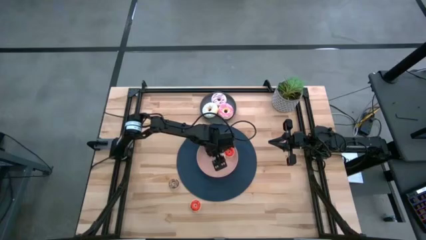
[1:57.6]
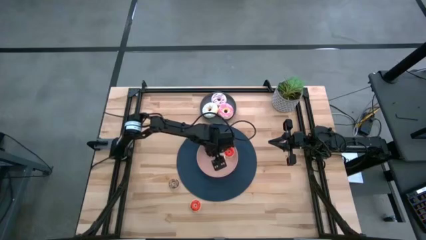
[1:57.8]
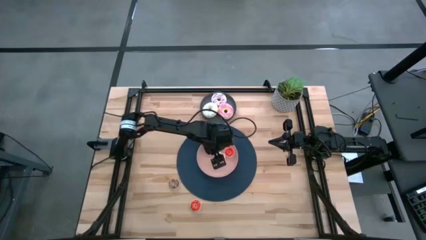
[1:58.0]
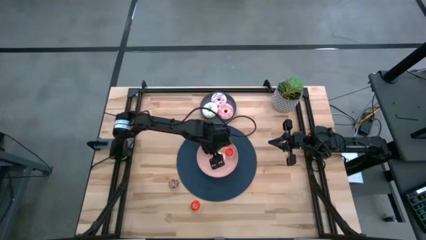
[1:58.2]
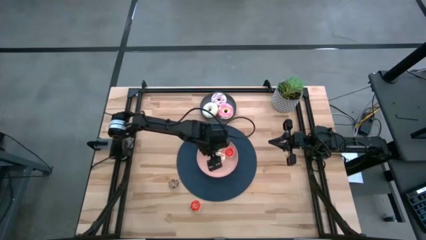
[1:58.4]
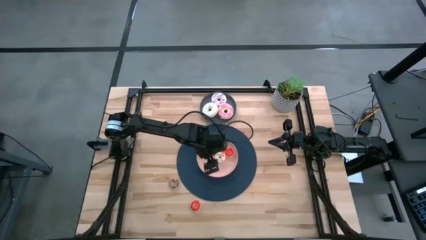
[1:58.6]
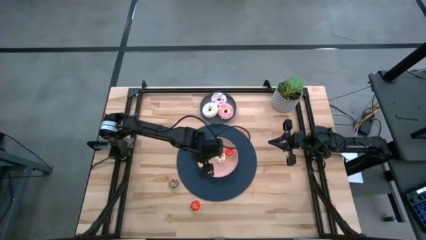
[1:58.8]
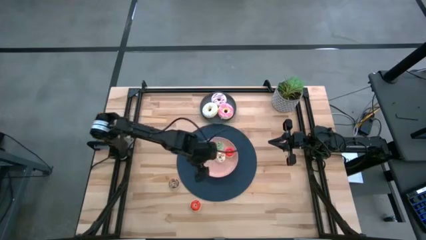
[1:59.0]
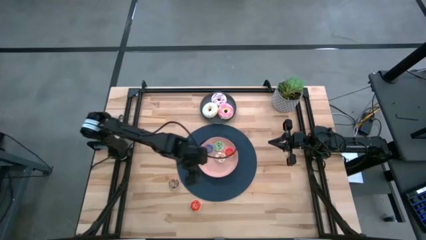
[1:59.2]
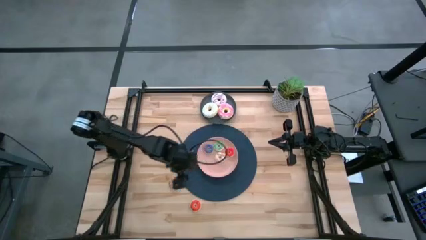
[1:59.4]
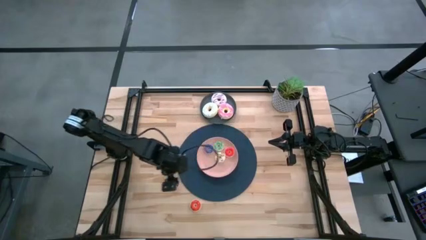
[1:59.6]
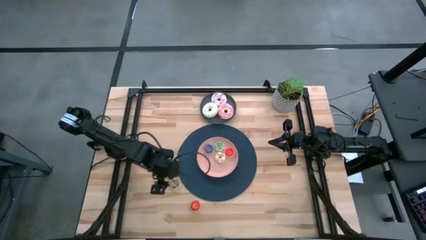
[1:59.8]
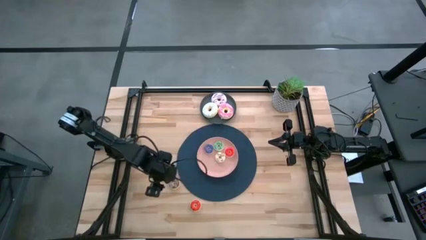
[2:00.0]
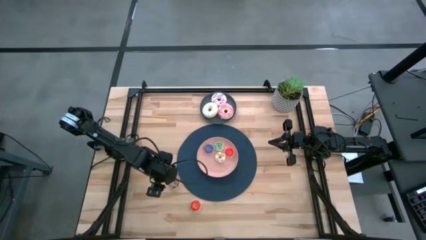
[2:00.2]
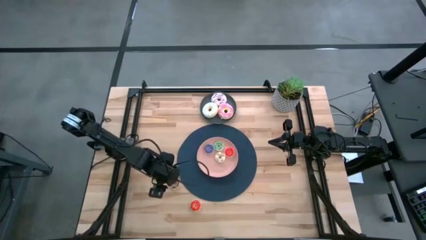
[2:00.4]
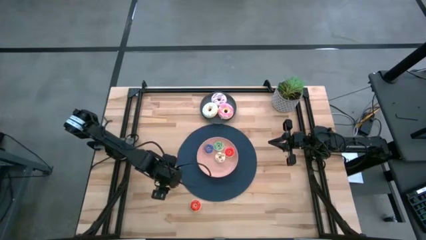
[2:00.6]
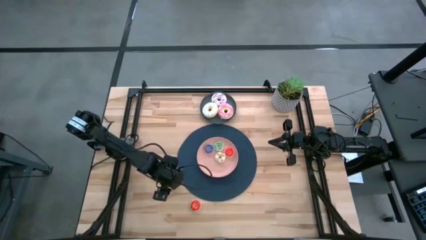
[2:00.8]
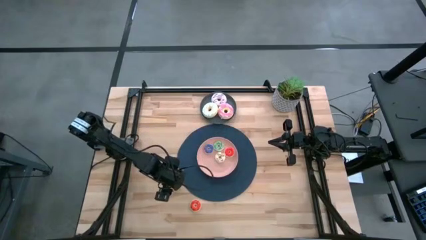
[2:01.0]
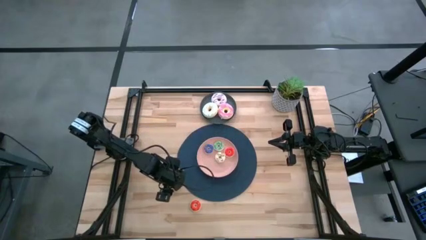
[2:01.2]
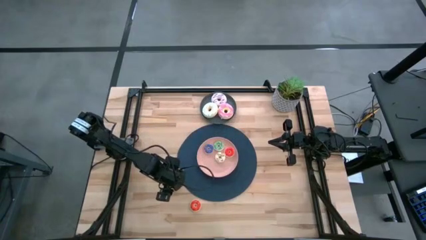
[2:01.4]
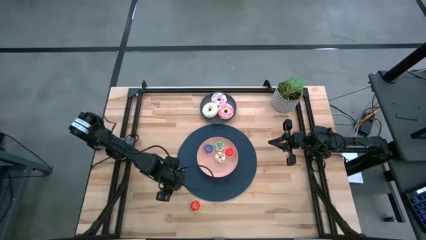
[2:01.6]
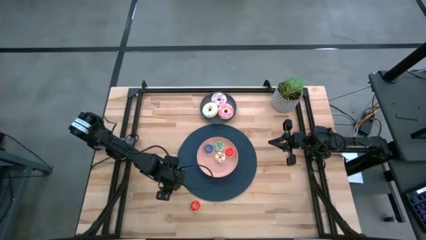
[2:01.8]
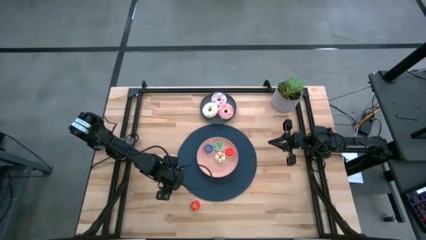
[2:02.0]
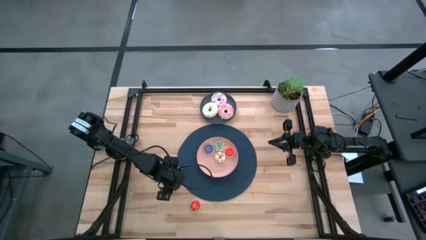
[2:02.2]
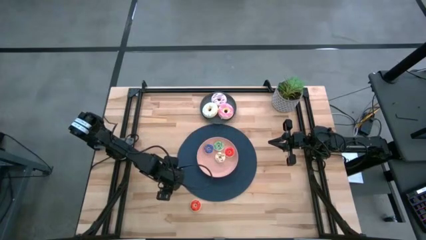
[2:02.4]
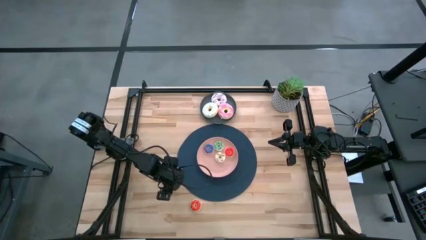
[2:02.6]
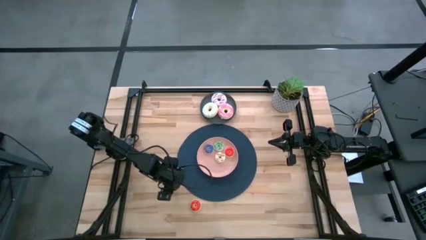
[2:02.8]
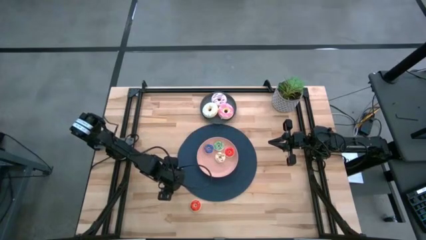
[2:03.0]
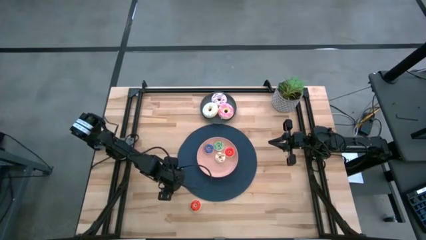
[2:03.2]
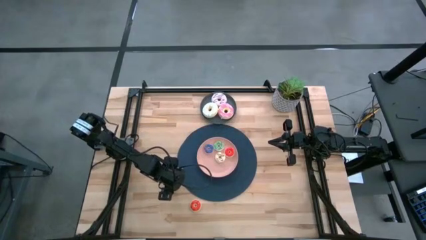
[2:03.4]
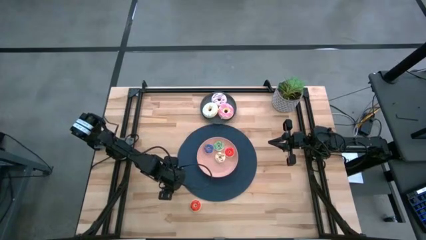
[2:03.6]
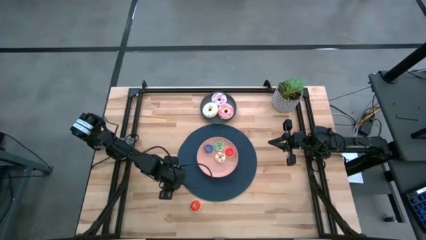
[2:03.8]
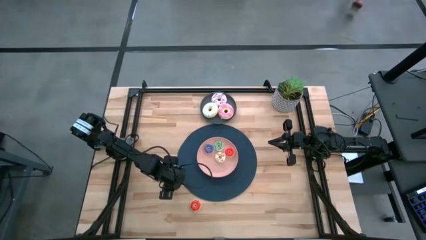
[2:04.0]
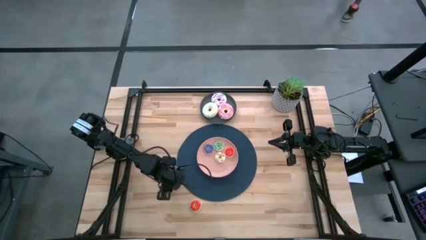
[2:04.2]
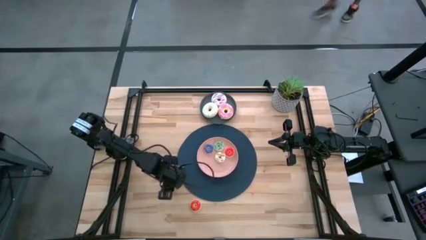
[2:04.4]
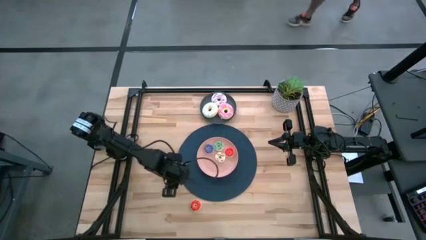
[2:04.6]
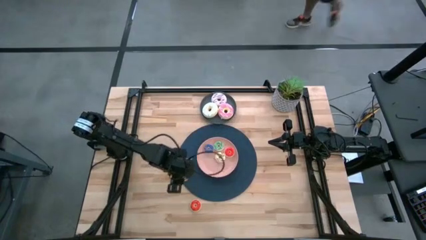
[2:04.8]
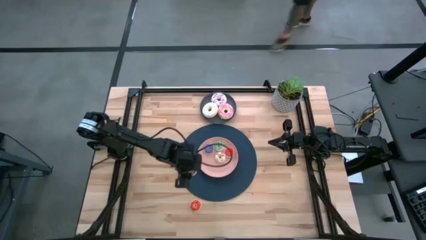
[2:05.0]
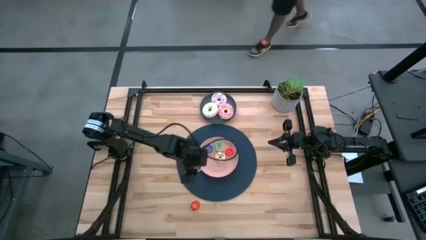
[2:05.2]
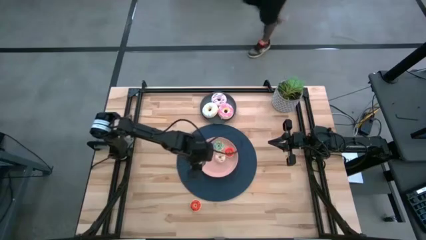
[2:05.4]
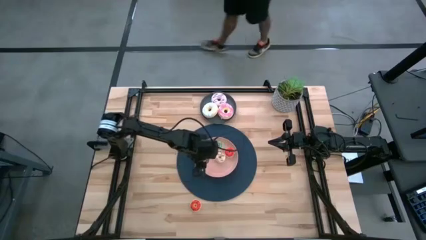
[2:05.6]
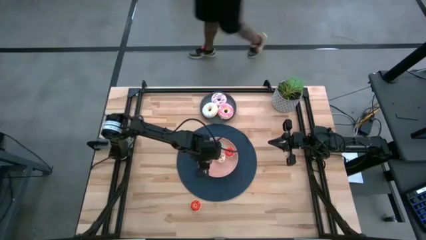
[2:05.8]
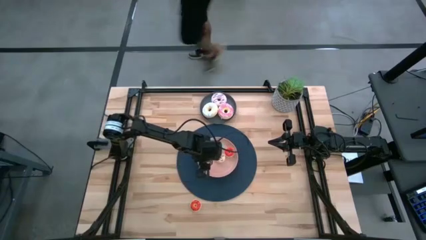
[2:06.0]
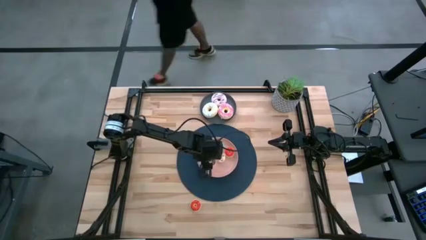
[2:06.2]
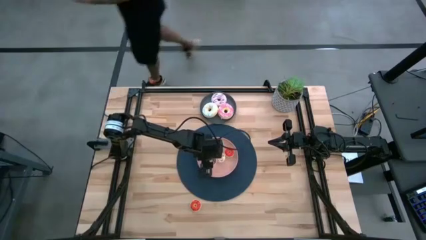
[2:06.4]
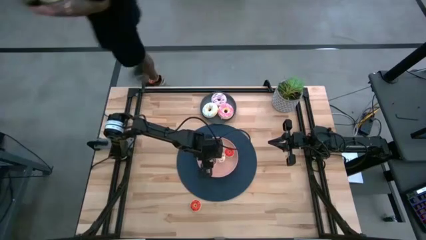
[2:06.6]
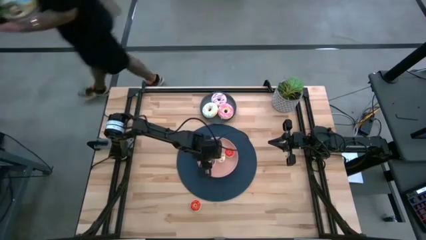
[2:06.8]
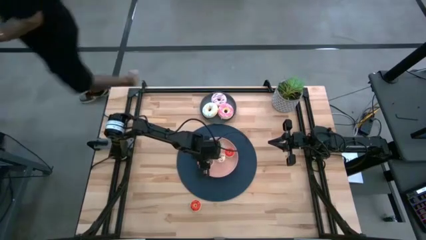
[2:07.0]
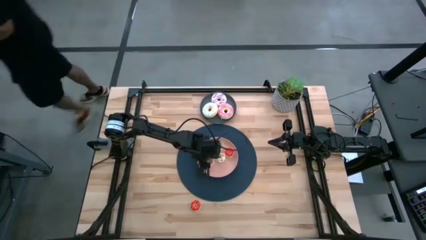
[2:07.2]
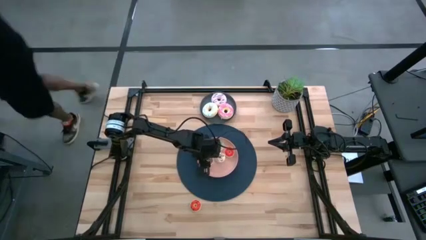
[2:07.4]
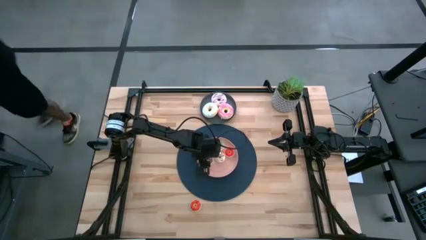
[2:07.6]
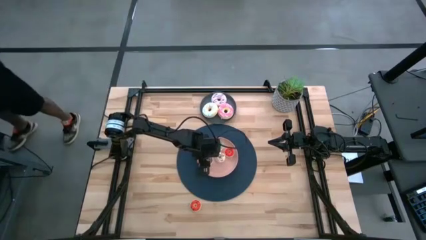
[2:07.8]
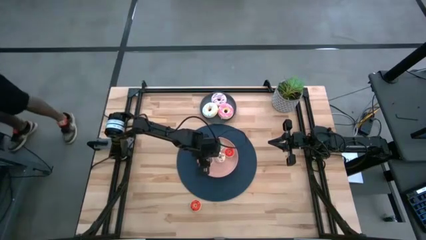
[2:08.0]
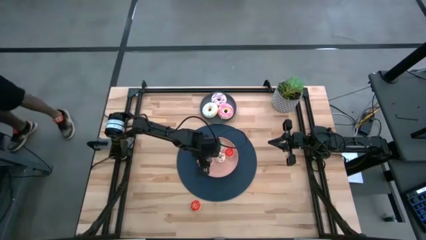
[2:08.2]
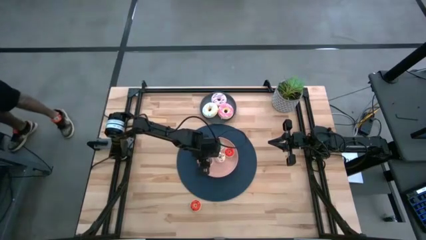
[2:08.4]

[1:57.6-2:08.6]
Task: Pick & Place donuts
Put the small brown donut on the pink plate

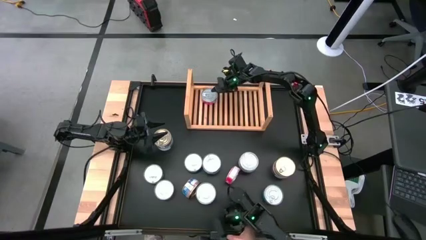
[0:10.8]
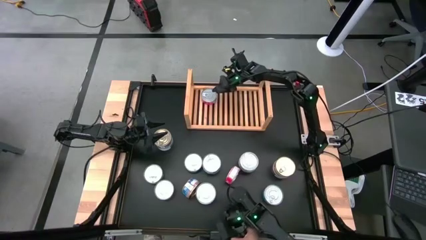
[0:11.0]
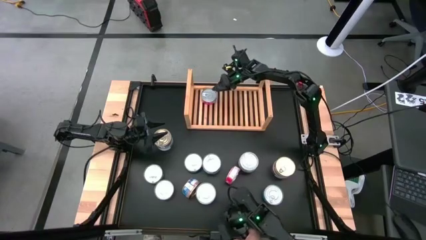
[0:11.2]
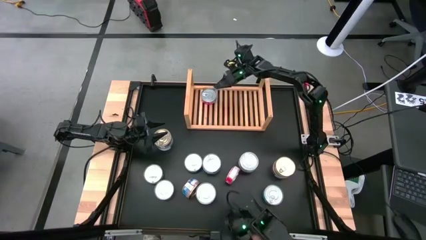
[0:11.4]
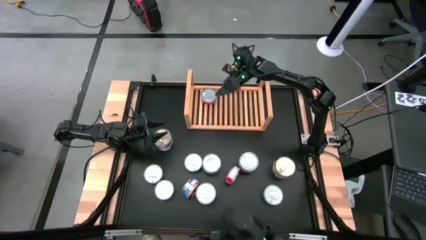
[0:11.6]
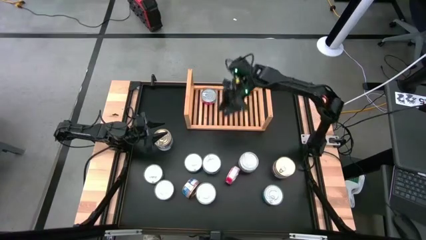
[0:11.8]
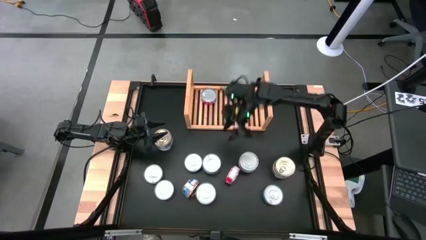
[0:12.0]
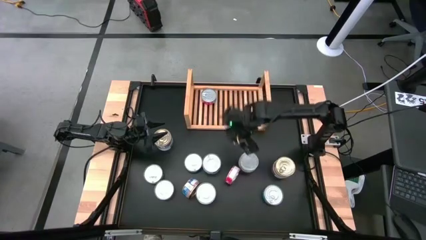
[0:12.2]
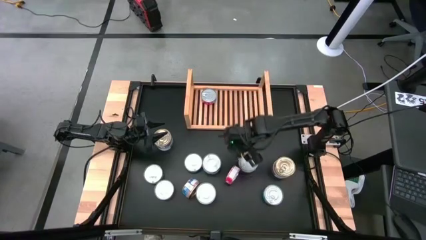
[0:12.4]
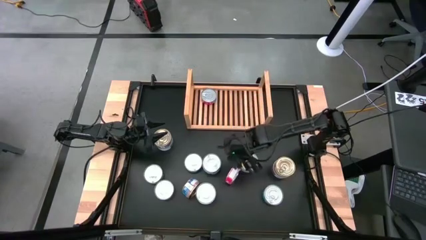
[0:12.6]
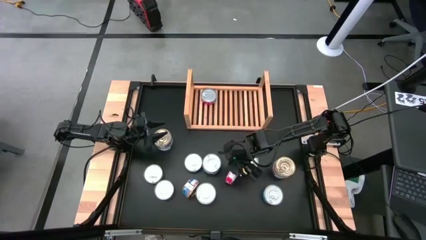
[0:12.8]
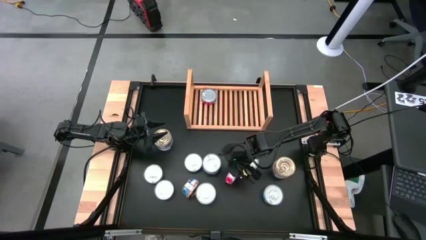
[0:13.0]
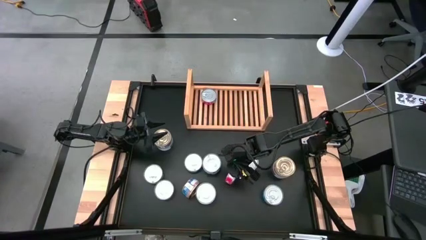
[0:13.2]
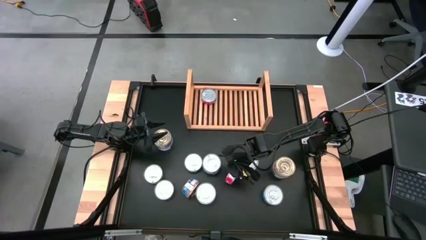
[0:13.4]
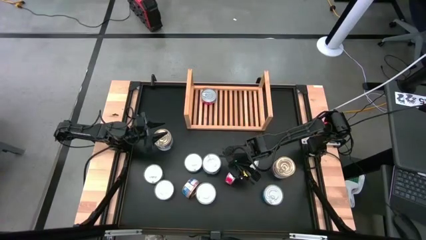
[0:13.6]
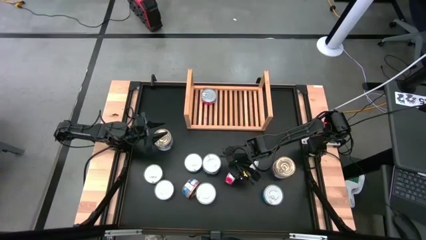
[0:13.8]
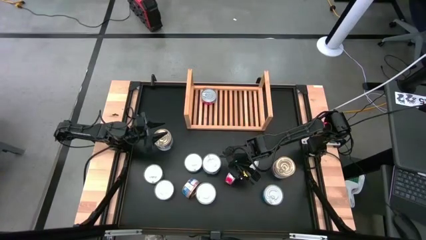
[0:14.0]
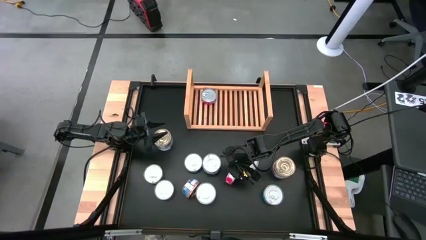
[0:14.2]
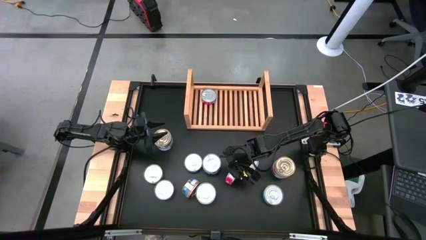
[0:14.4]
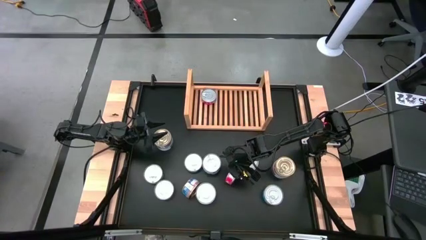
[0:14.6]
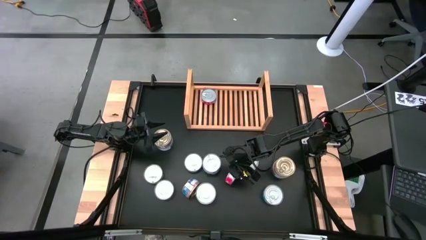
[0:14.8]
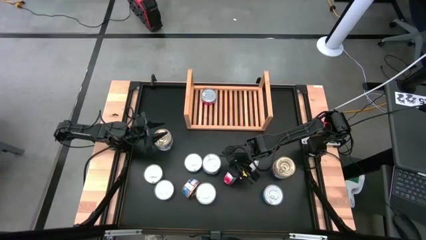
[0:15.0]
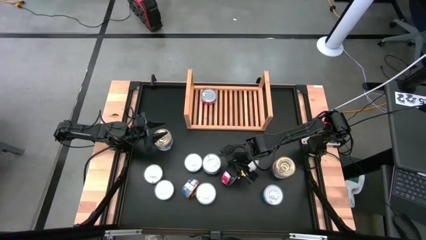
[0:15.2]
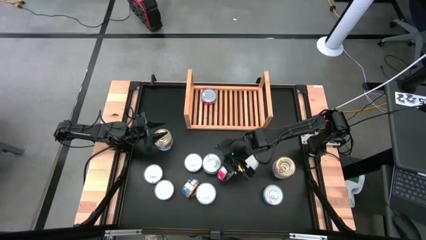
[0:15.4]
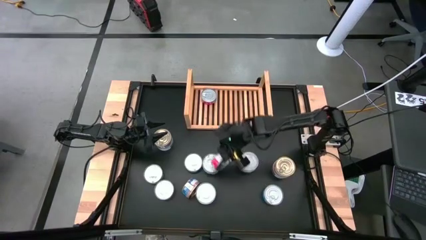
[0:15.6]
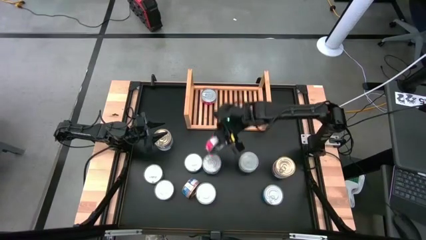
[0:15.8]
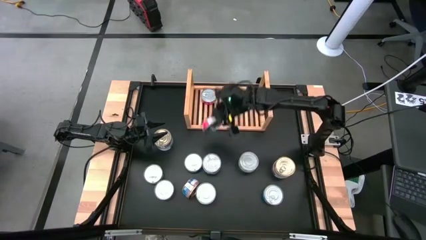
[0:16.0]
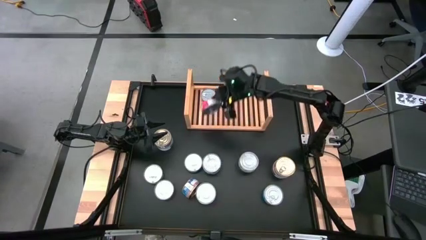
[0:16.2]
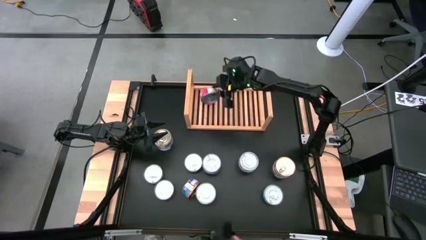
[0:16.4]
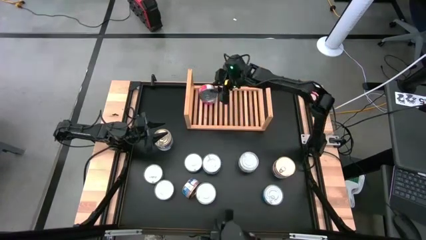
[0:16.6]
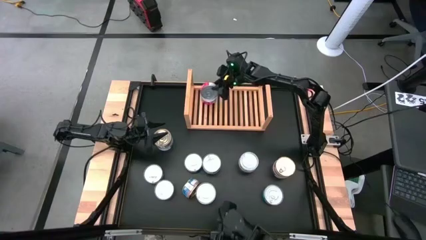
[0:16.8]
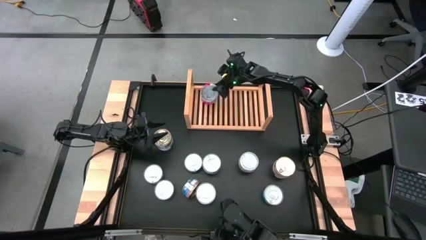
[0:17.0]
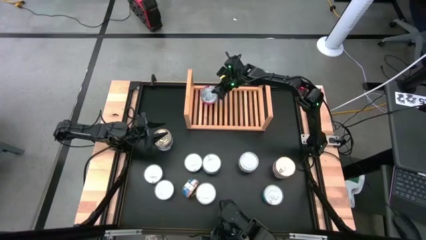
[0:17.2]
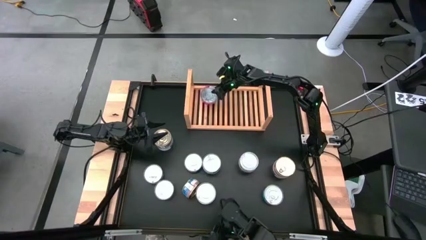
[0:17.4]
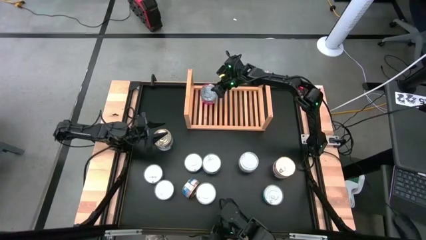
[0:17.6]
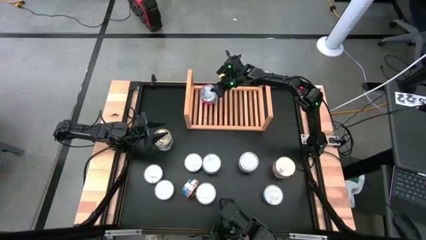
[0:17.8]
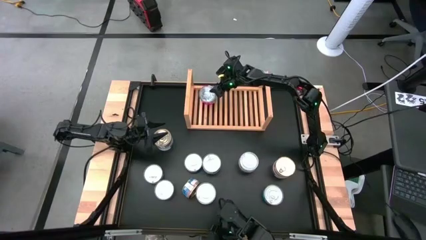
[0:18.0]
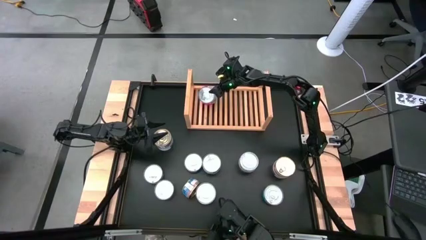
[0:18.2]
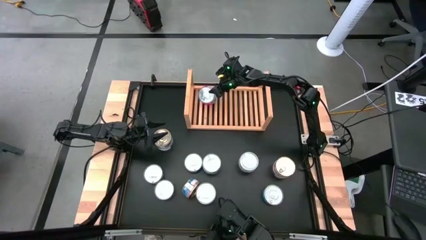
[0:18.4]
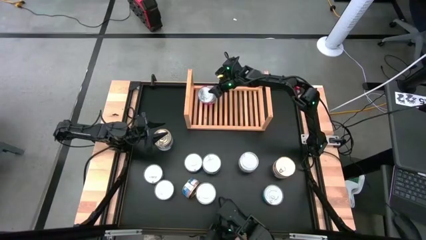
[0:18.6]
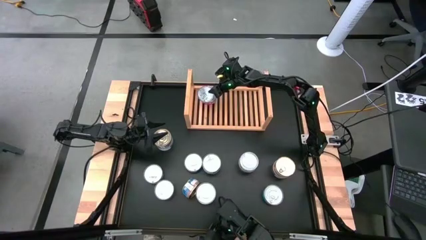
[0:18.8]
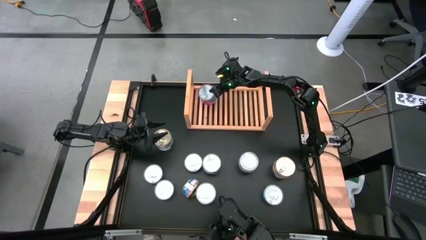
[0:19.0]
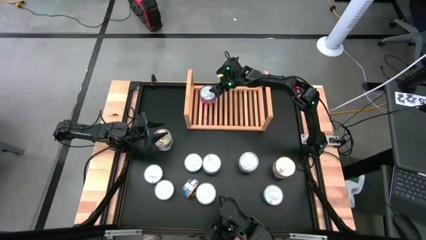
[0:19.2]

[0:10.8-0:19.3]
Task: Stack canned seafood by type on shelf
Stack the red tuna can on top of the other red tuna can on the shelf
